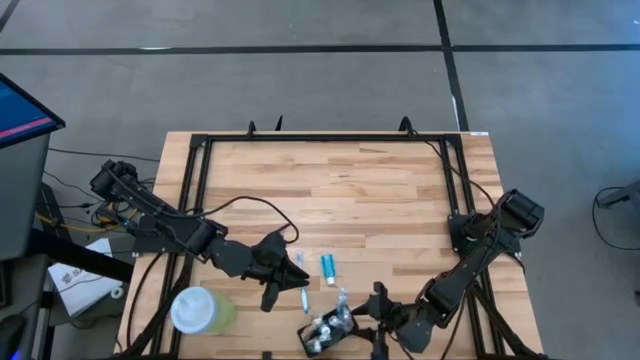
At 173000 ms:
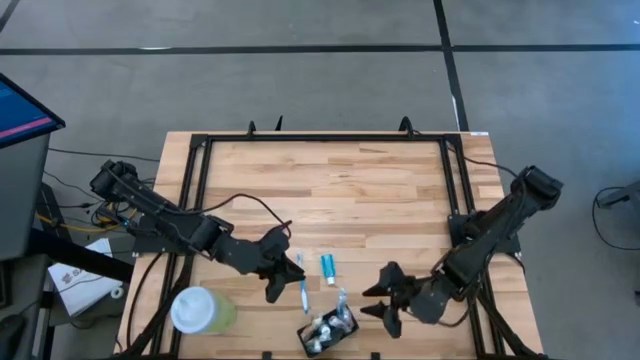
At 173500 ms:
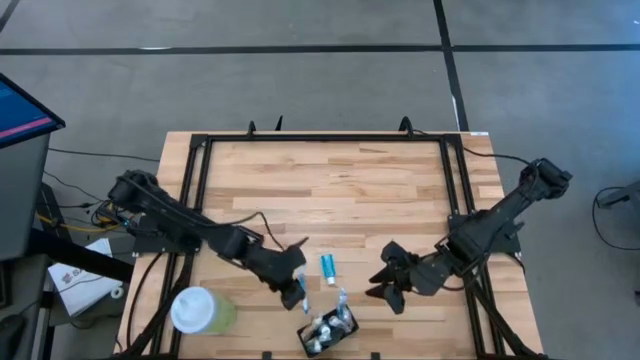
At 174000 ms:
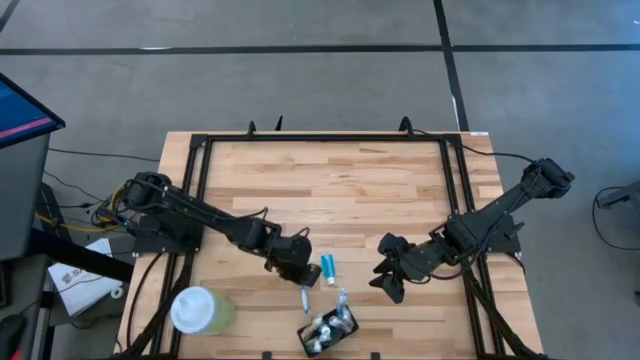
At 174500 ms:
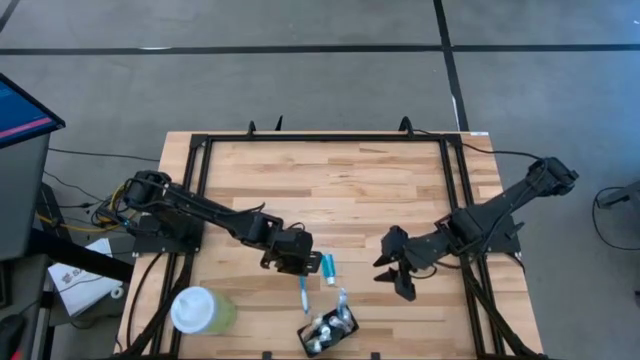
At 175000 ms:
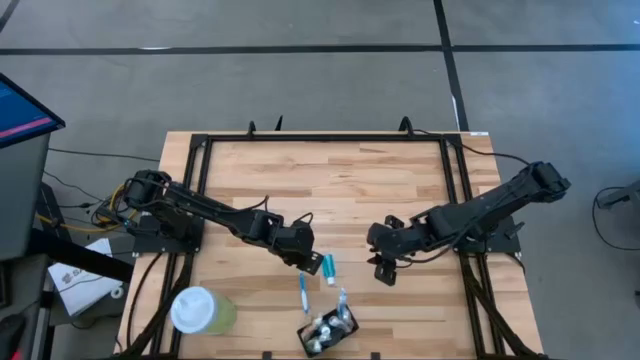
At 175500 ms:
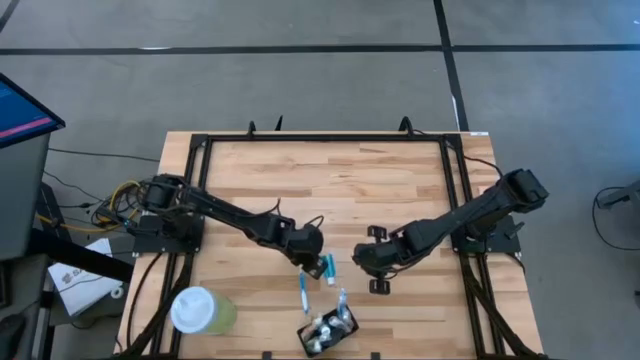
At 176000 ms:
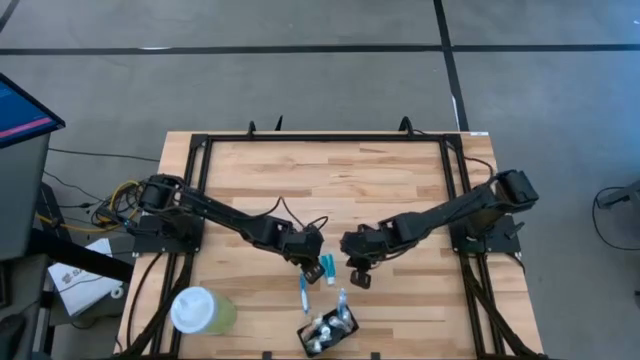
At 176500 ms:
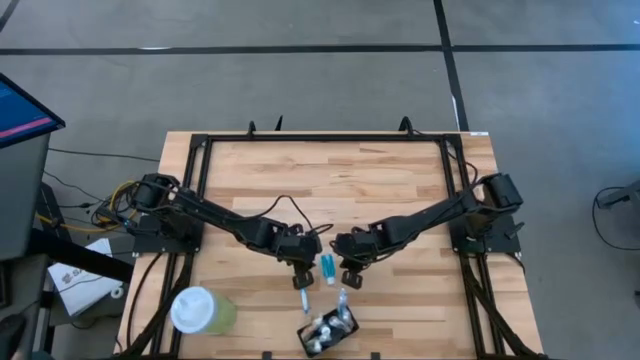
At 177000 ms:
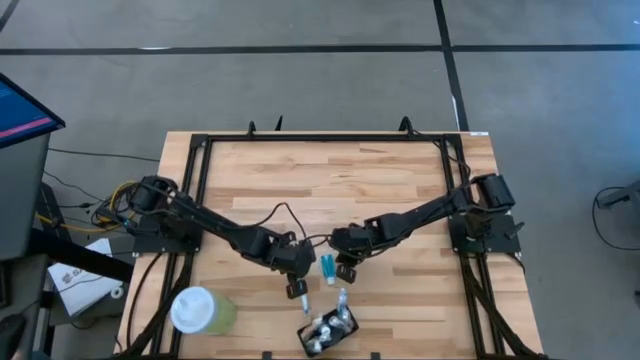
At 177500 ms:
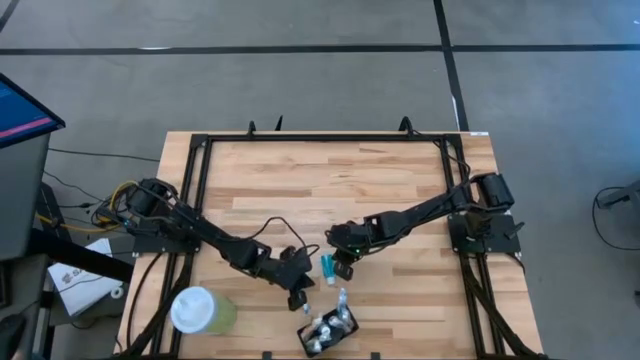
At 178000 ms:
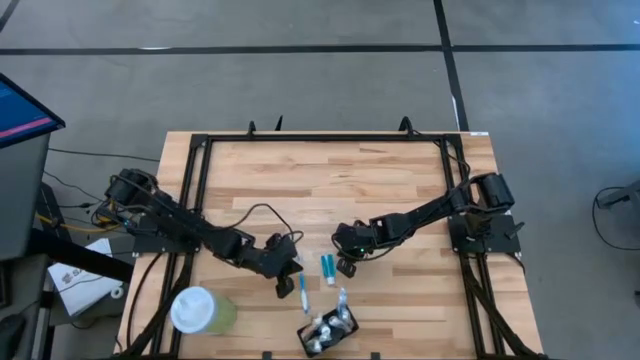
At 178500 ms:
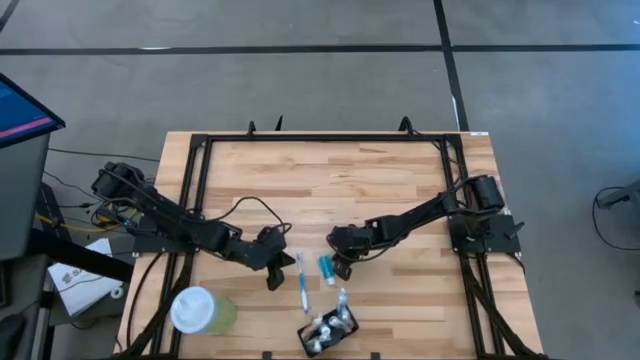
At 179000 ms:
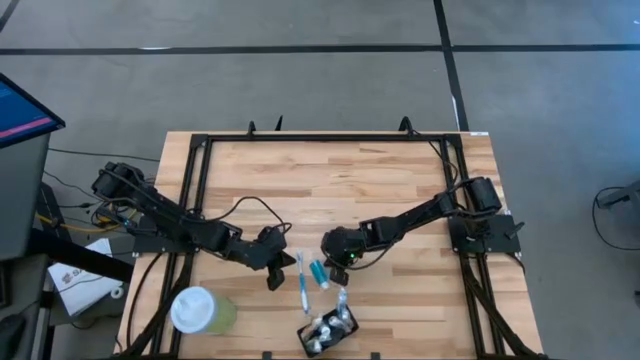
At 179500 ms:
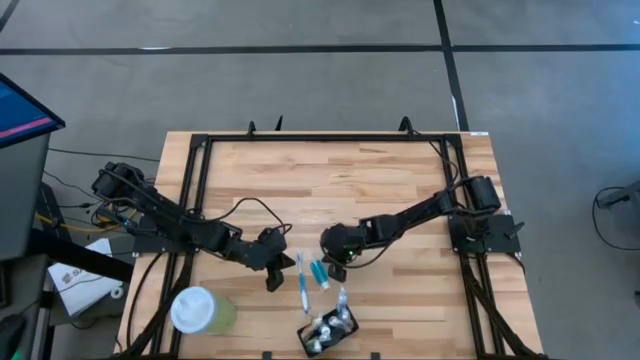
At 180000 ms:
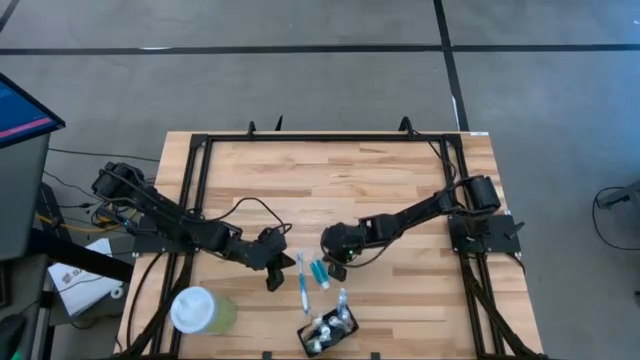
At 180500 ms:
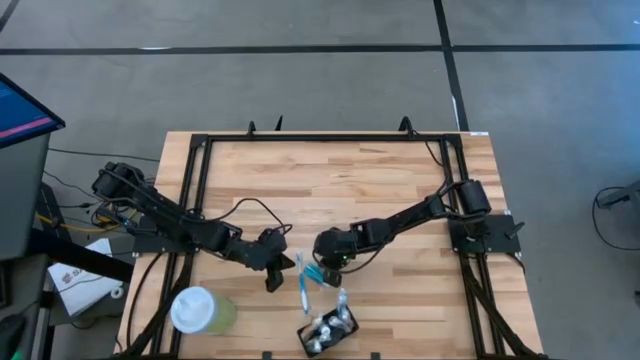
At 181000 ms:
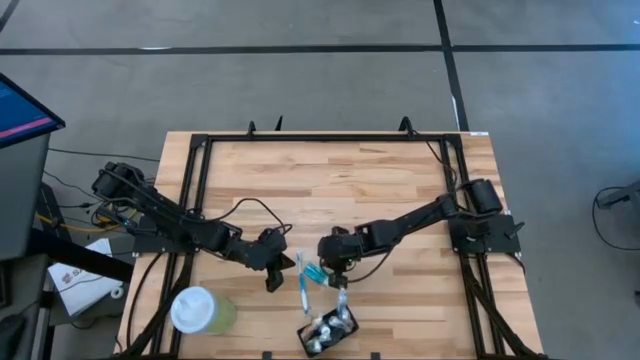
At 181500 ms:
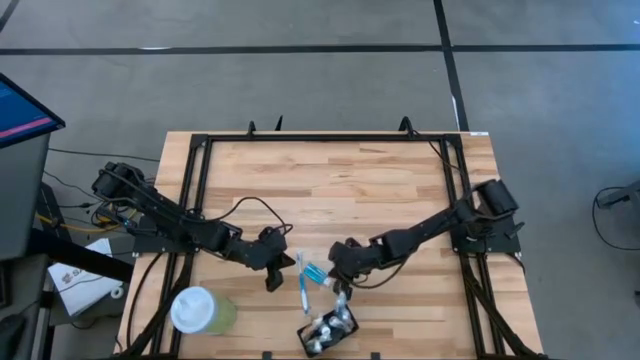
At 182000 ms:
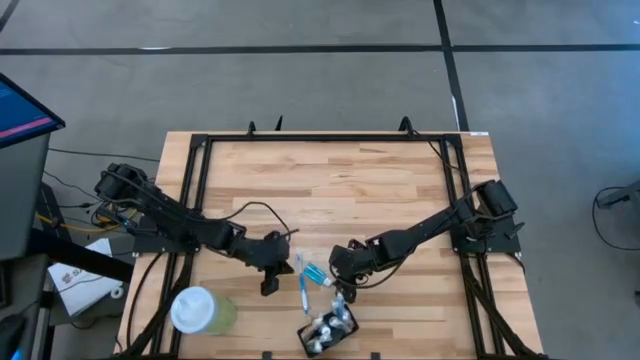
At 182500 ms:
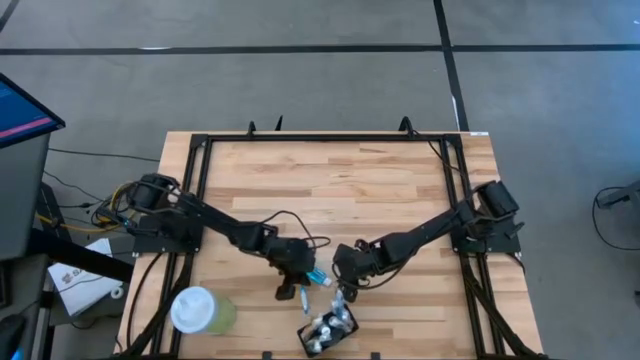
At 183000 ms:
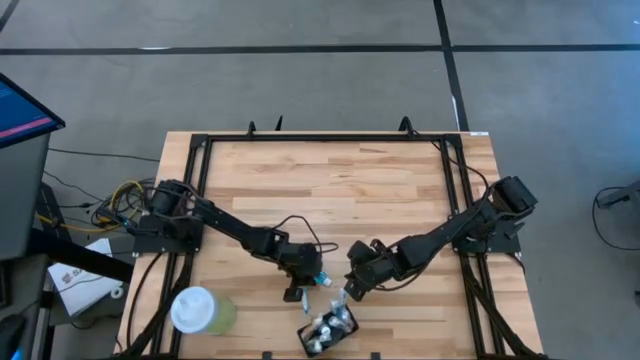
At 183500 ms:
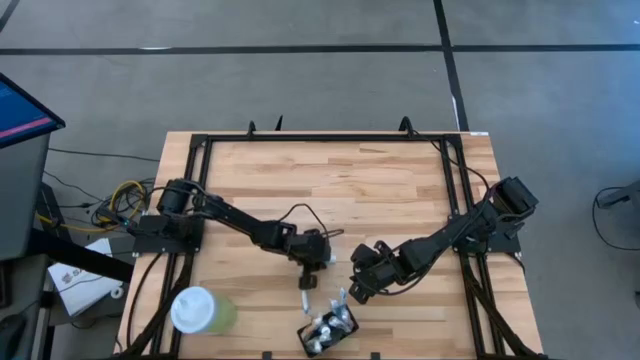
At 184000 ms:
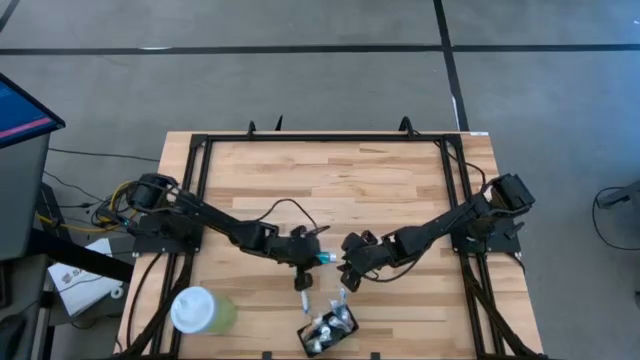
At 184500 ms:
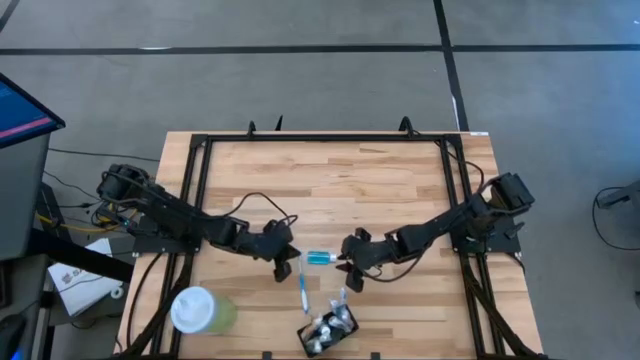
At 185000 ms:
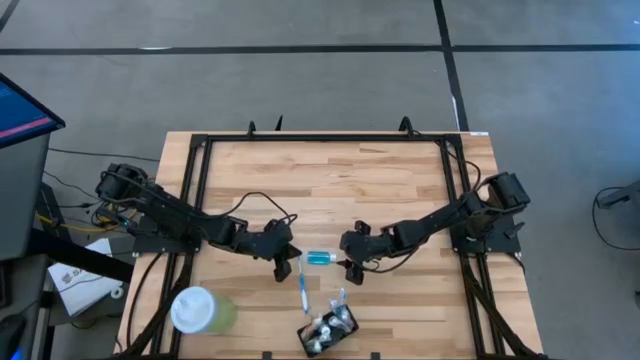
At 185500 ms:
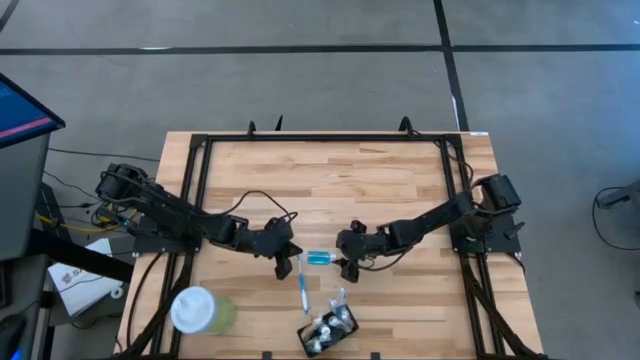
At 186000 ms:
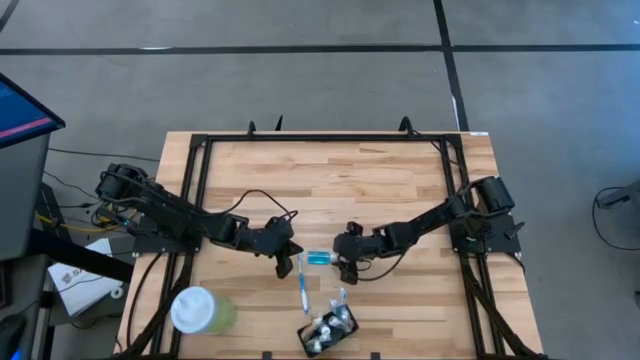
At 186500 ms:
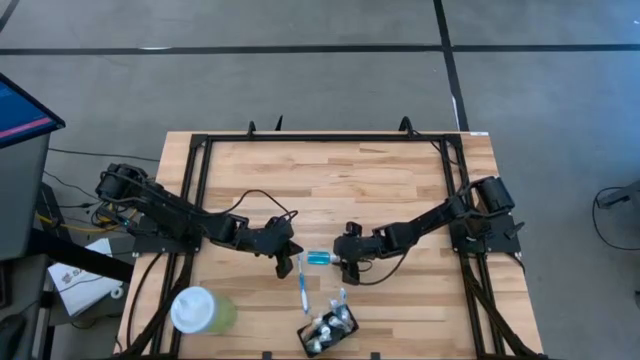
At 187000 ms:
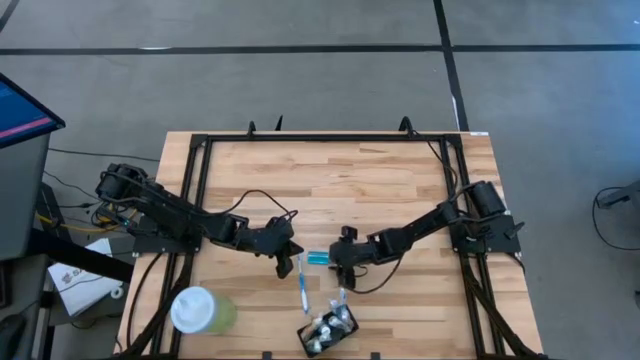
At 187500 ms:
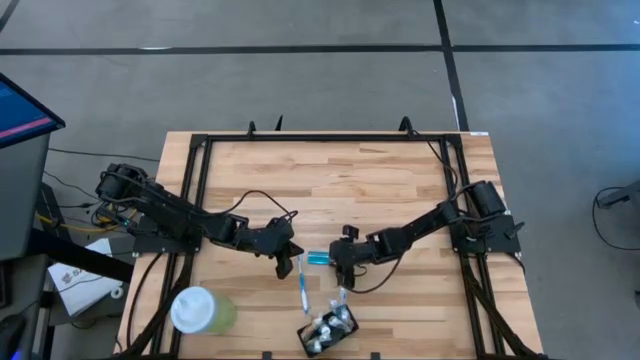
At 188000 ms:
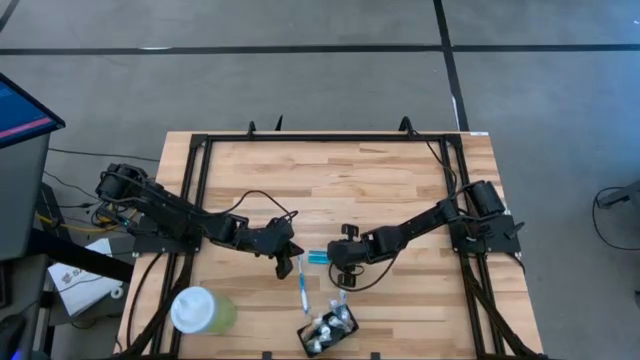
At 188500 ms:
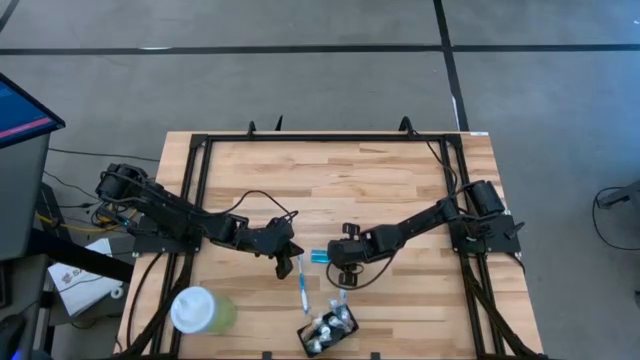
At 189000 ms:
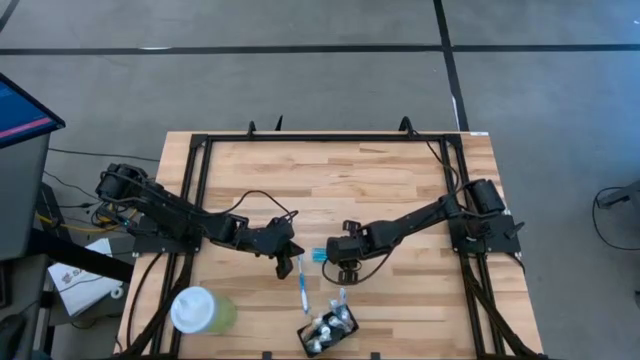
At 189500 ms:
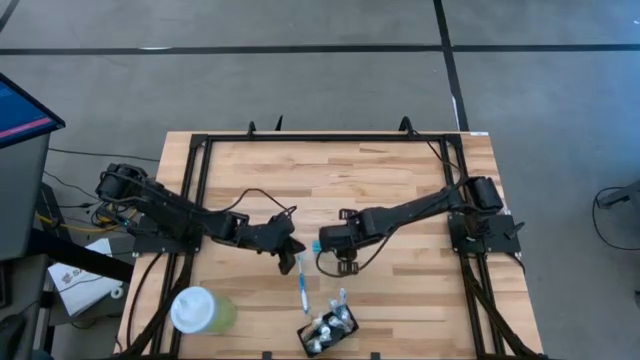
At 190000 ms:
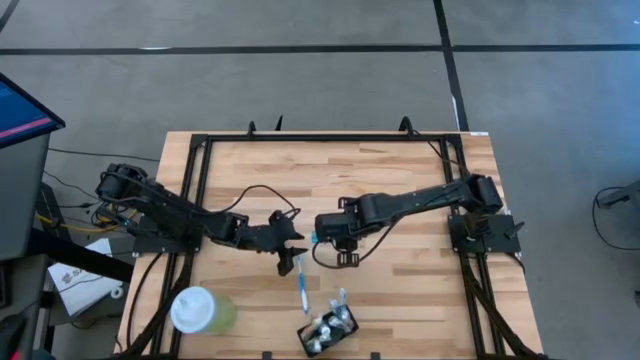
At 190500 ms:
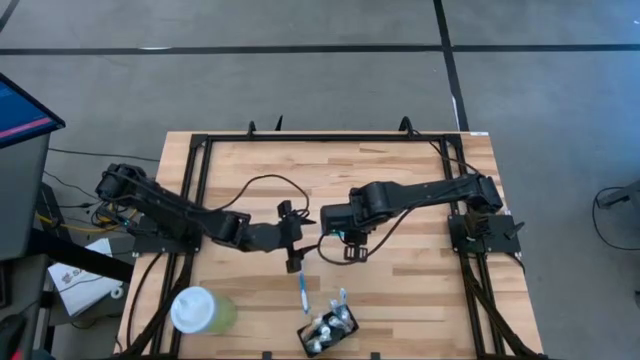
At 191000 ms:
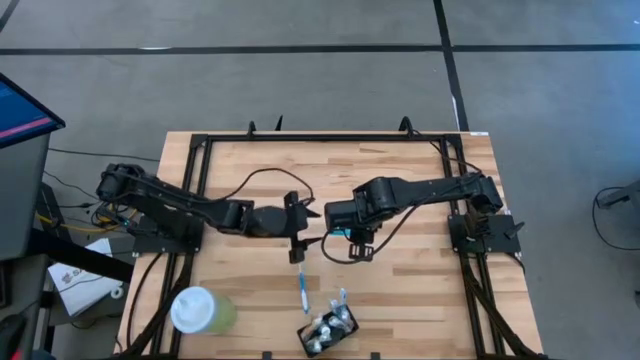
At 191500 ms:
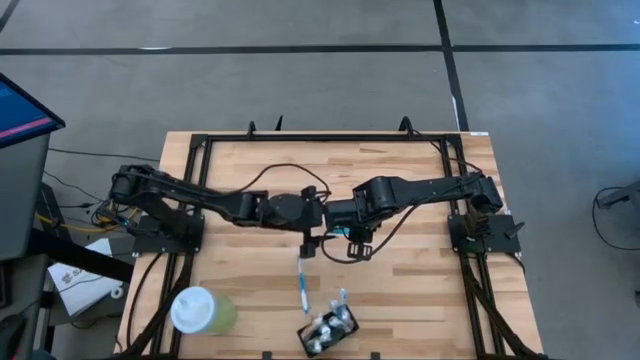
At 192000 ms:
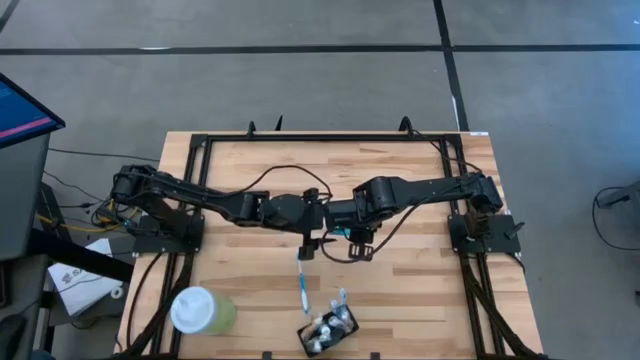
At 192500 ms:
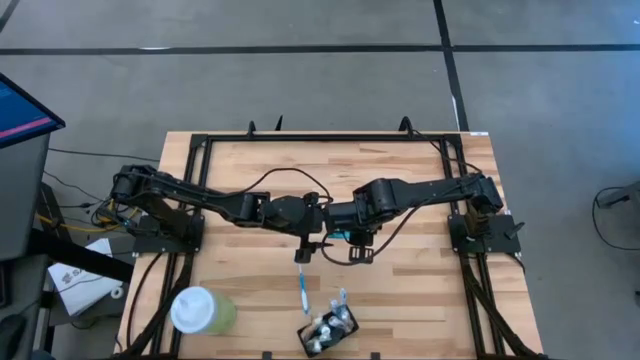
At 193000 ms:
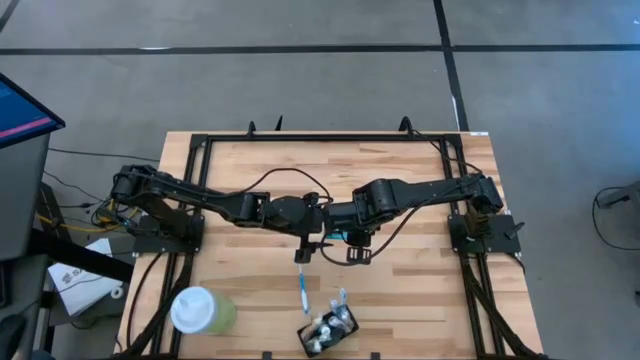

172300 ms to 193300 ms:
Task: Pick & Place toothbrushing station
Put the blue mouthwash into the black wire organizer
